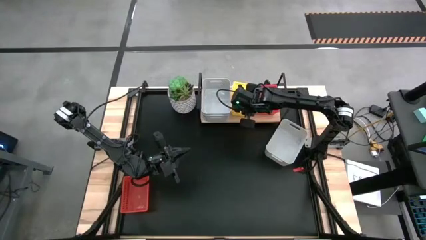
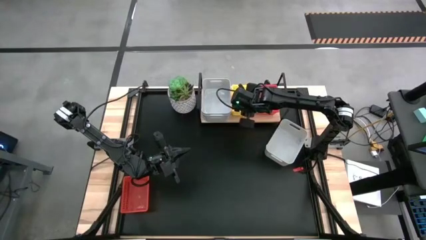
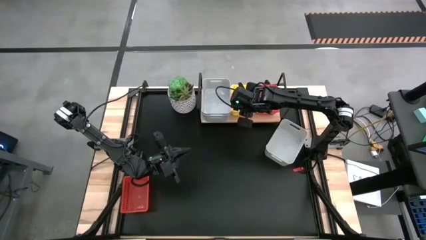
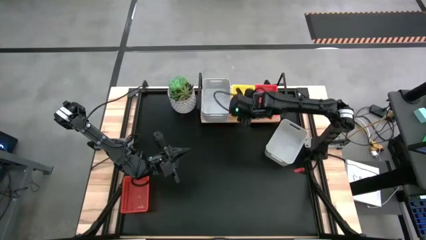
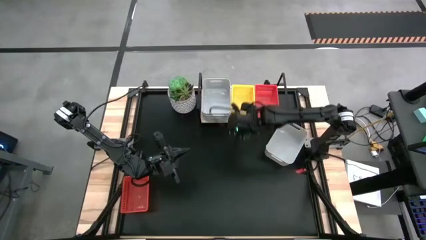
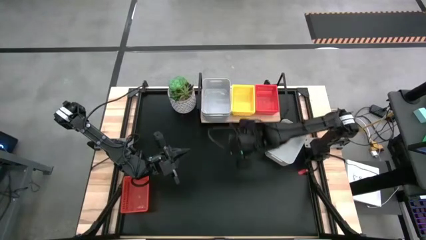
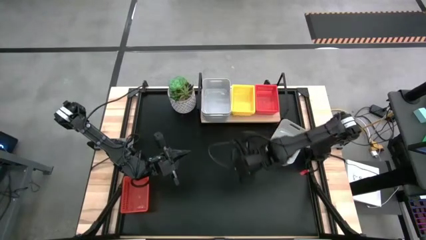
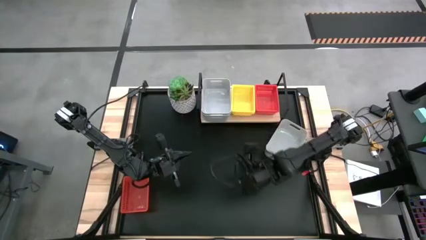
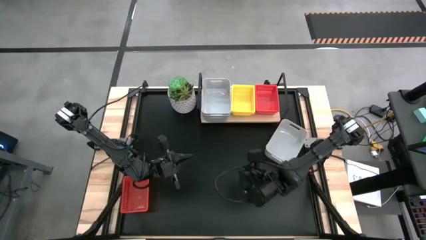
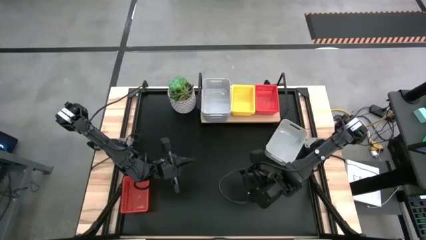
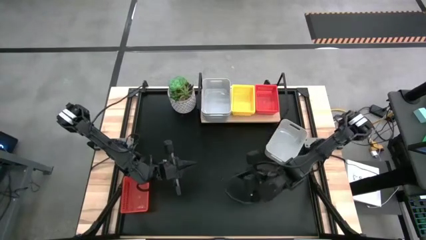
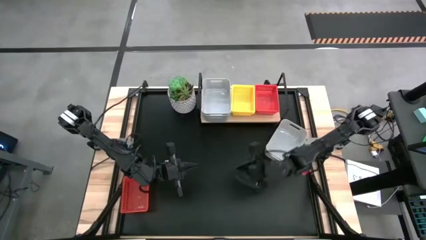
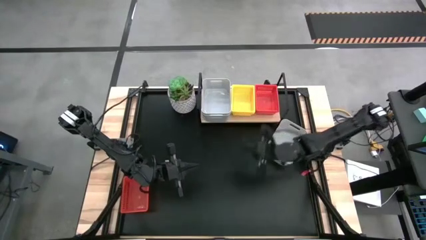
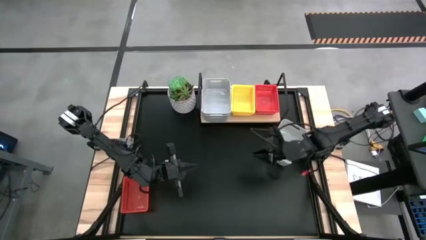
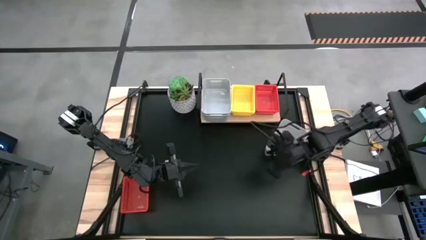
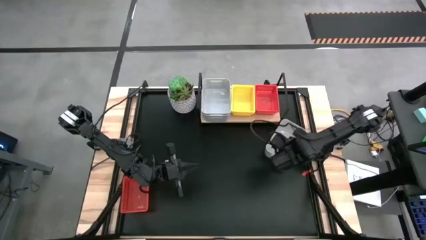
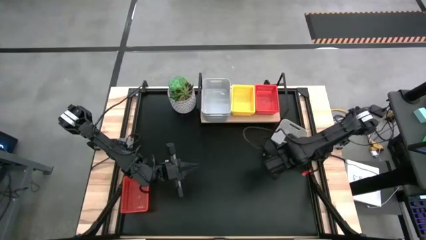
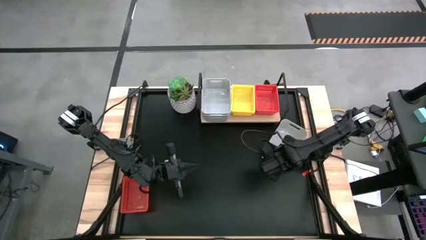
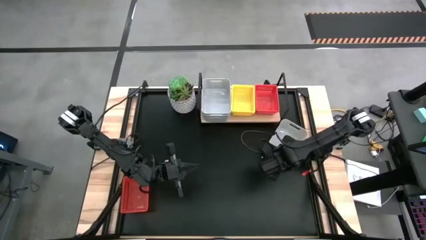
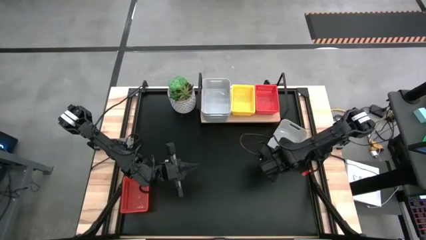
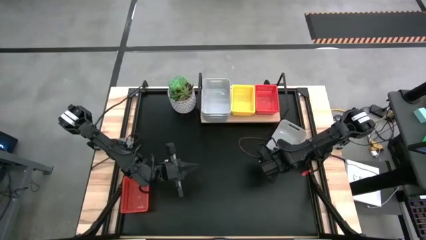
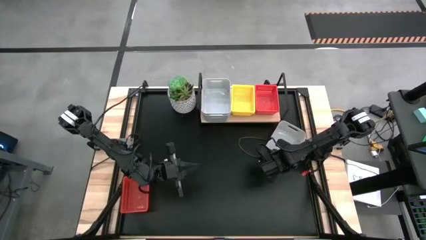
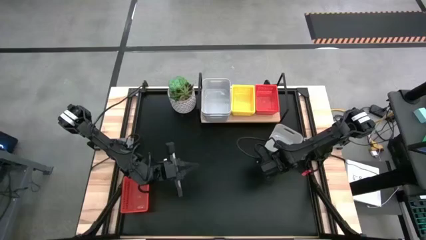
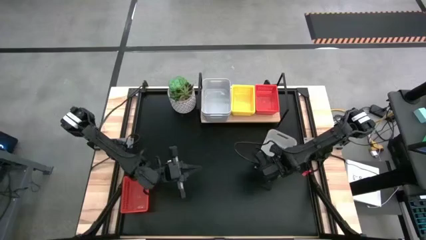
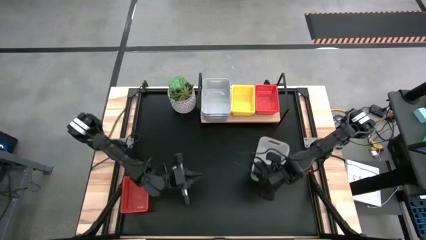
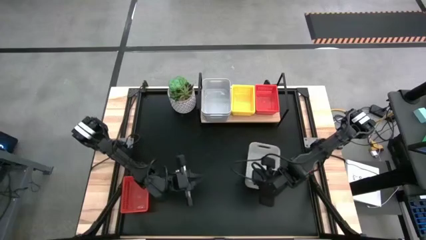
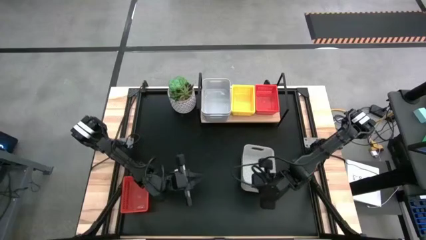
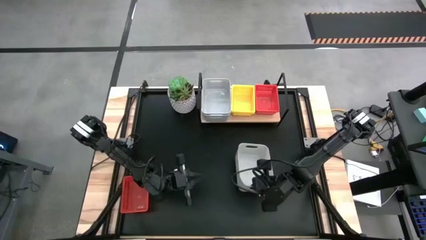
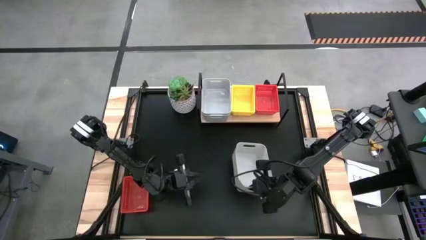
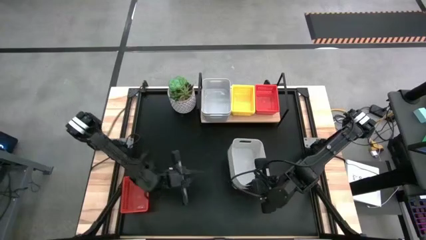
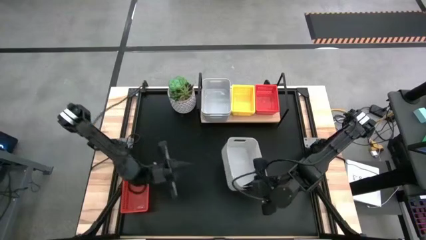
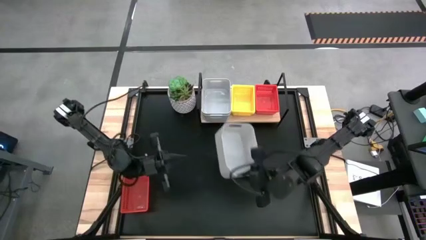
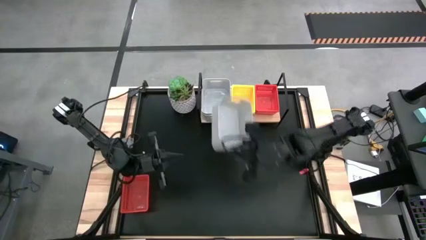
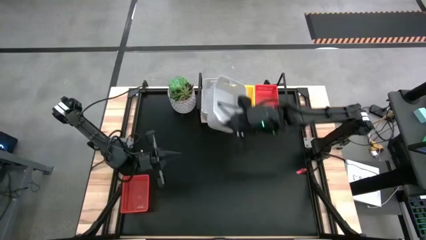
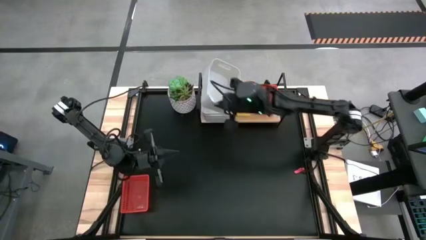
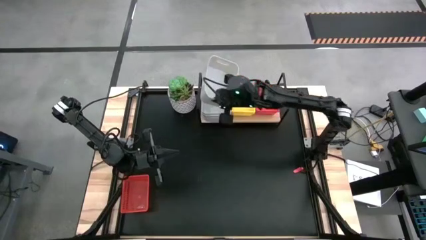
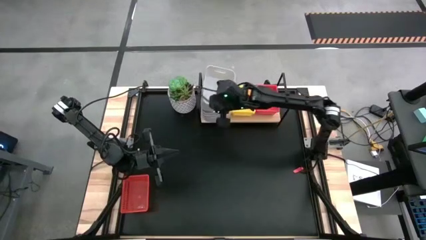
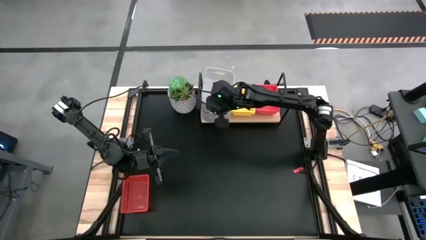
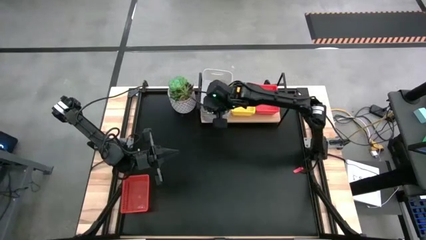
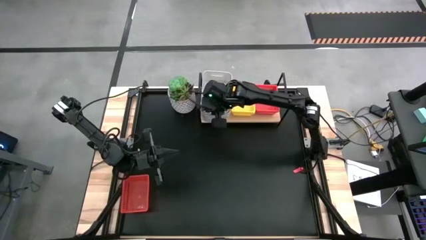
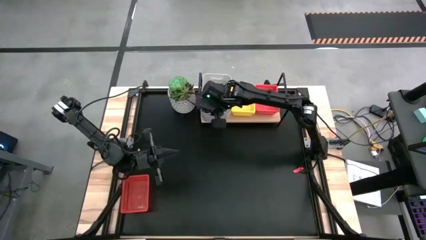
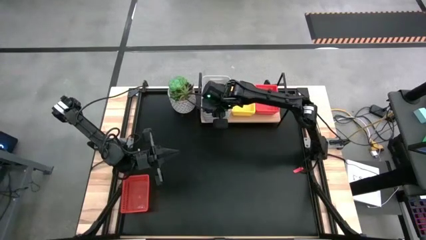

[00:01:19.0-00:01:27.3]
Task: Stack baskets on shelf by color
Stack the gray bin on the gray bin on the shelf

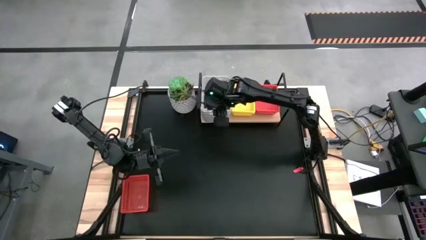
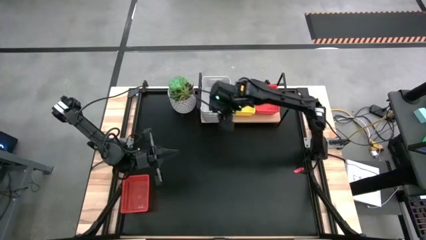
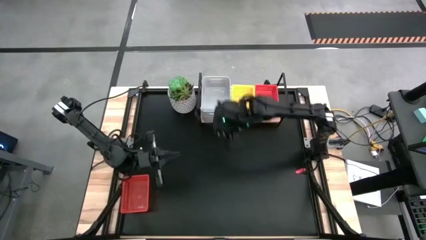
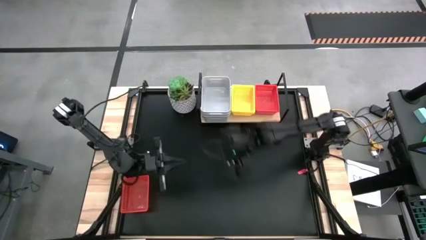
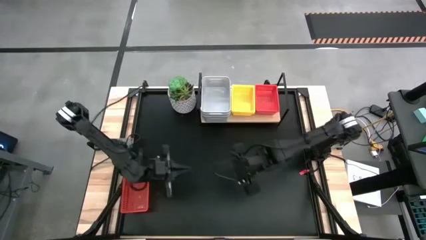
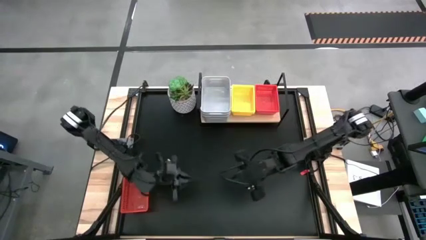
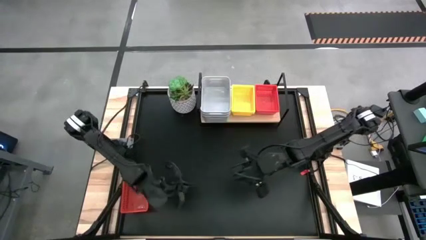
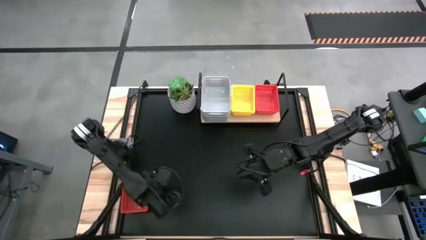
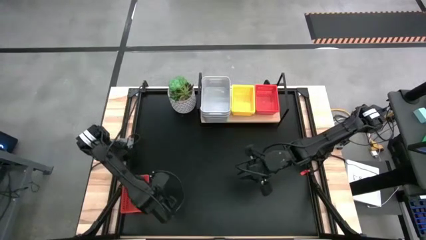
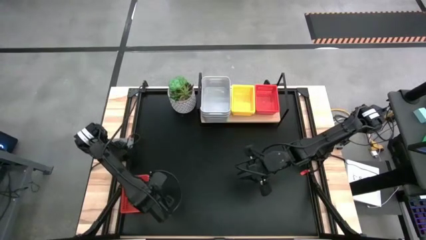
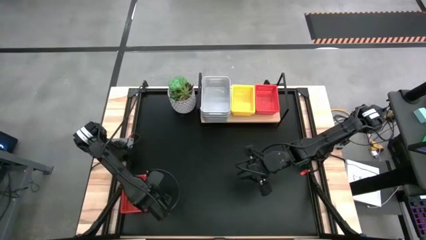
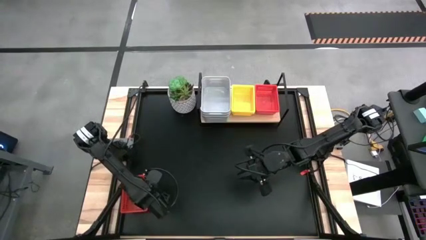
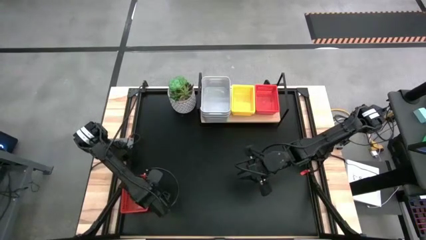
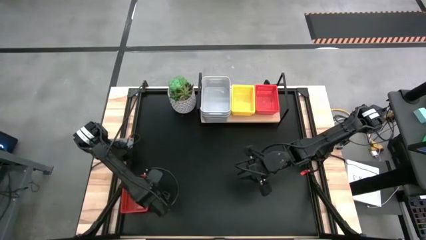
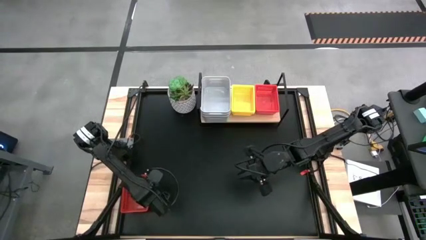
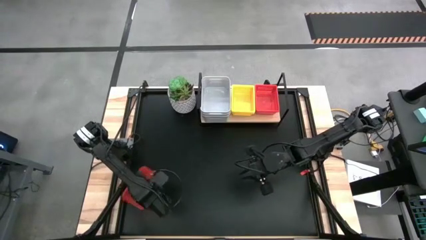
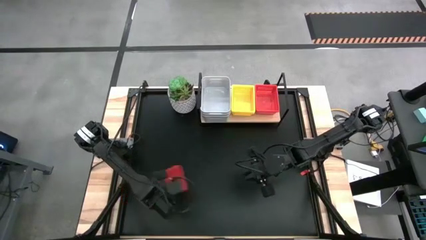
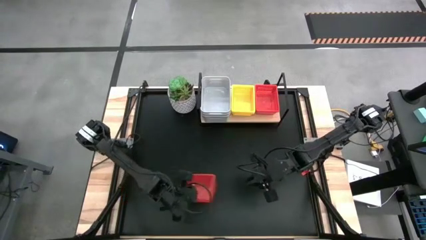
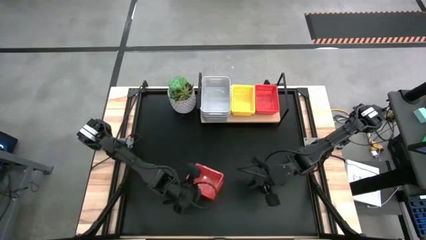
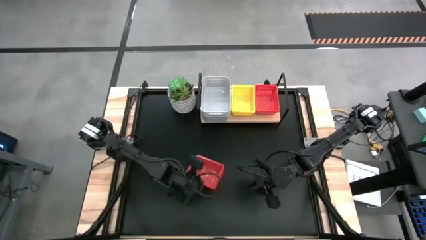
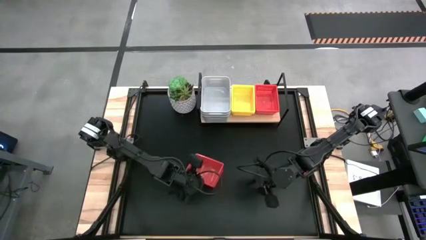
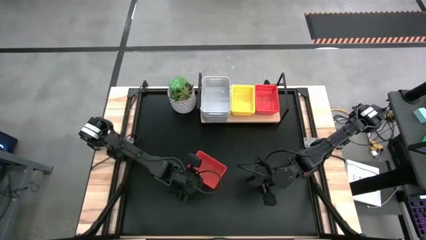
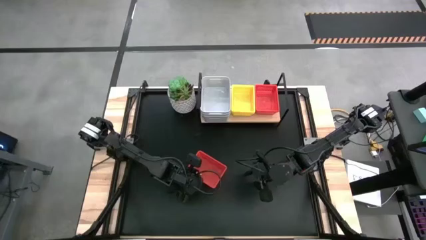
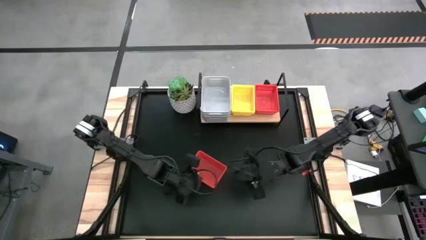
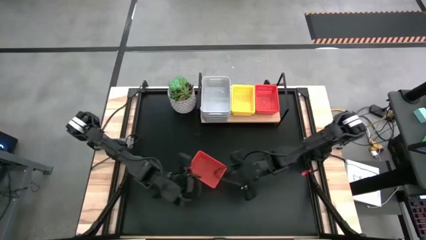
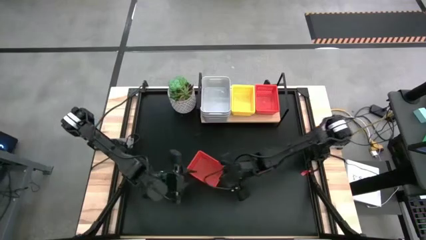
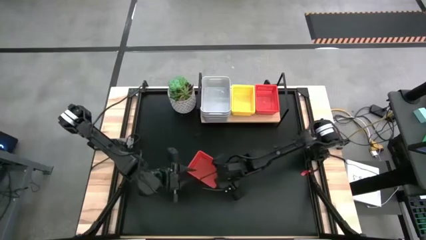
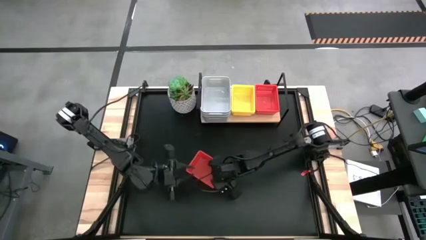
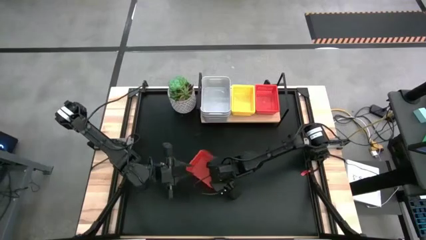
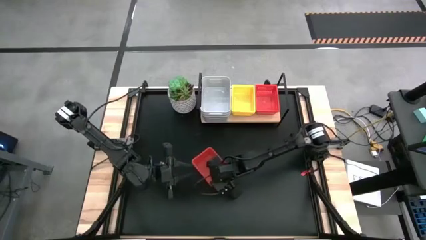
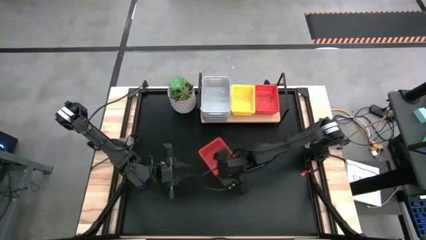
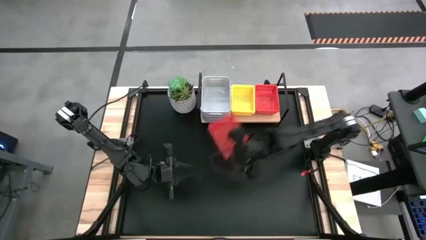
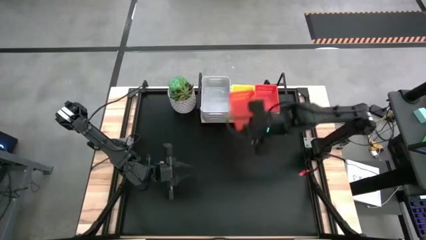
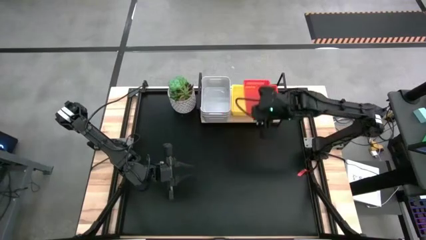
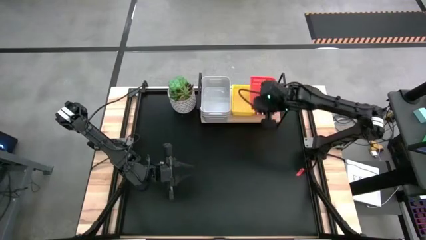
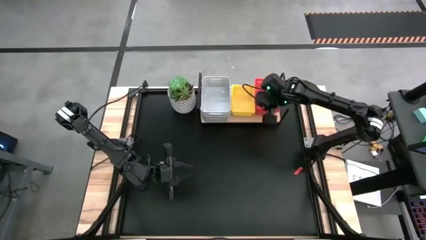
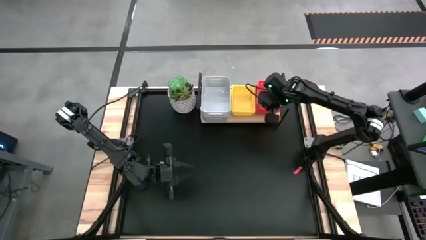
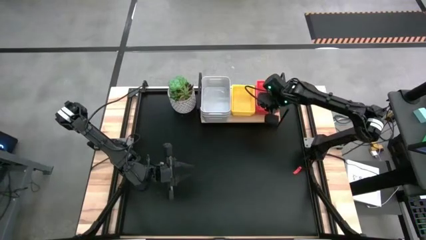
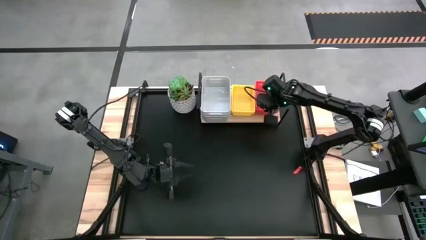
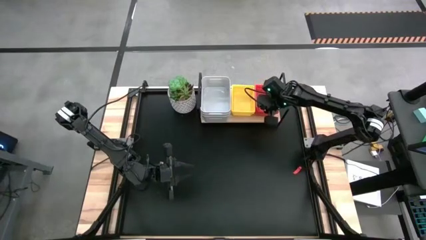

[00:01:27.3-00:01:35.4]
Stack the red bin on the red bin on the shelf
